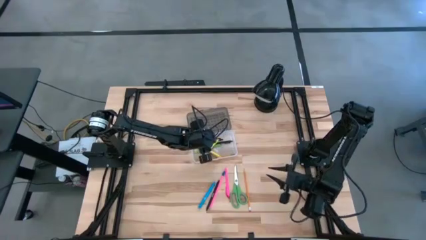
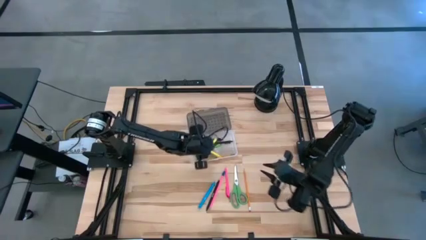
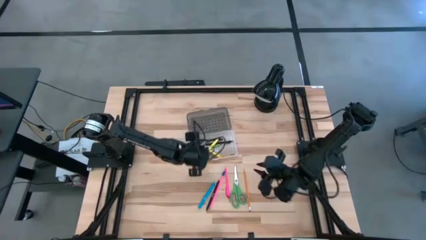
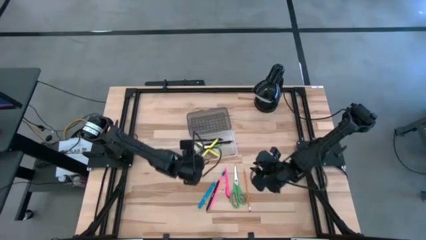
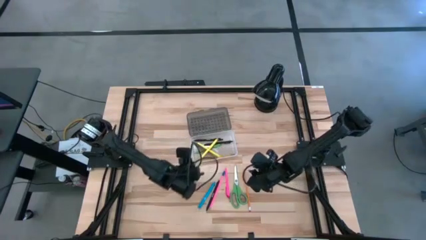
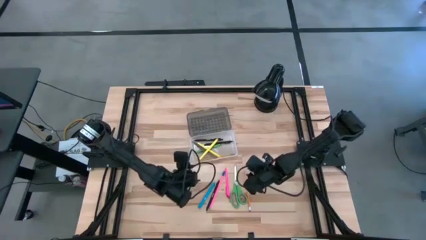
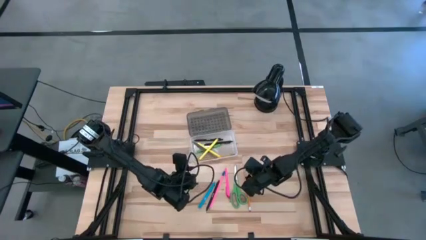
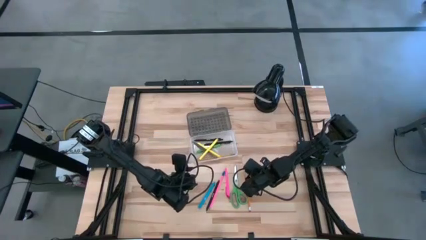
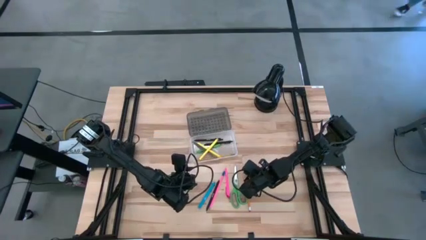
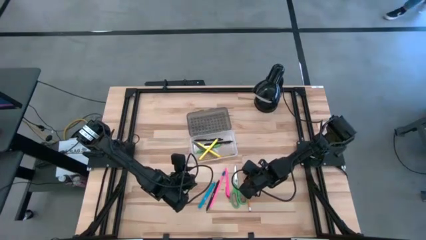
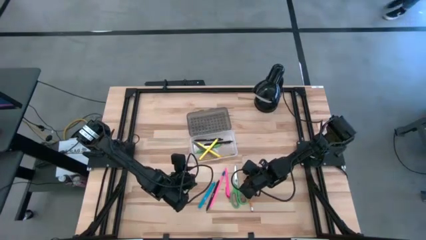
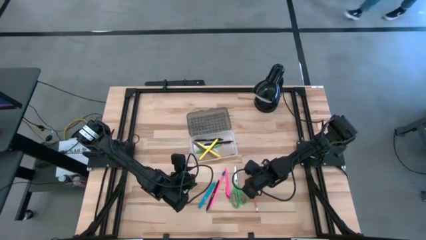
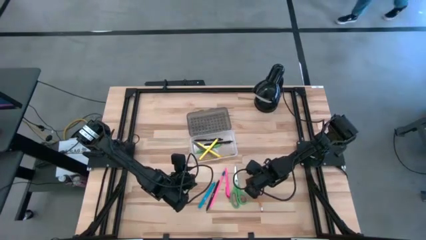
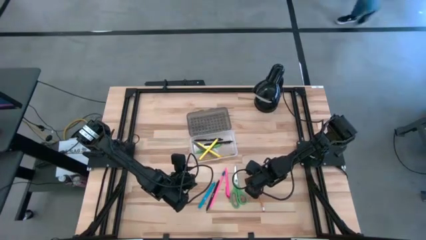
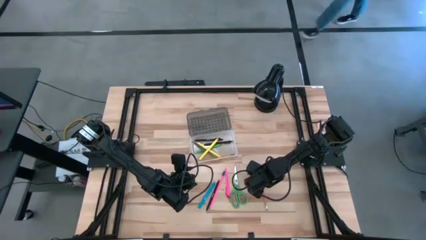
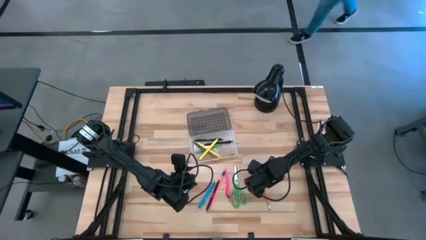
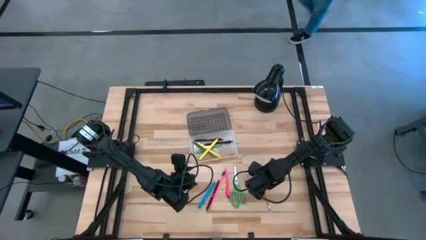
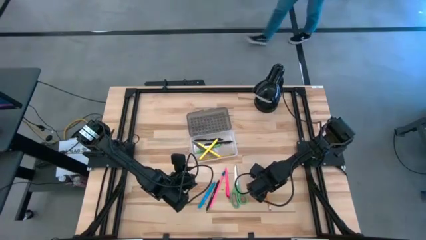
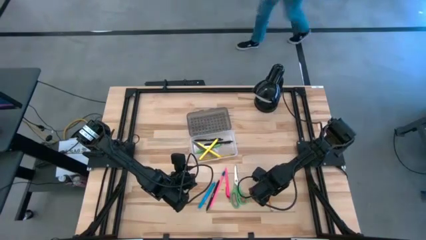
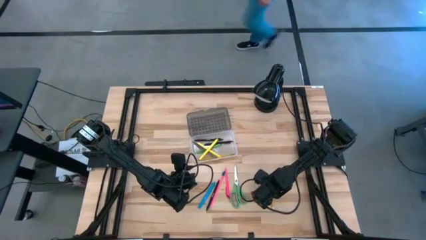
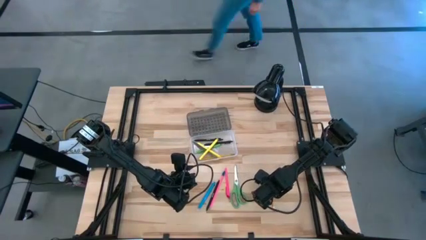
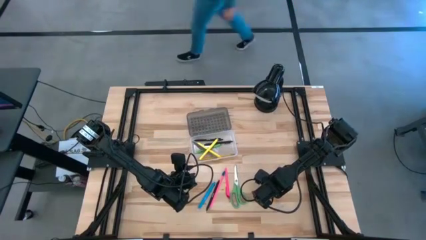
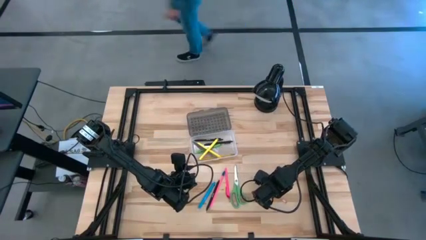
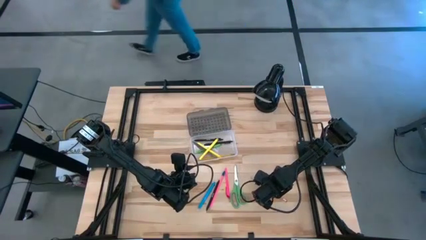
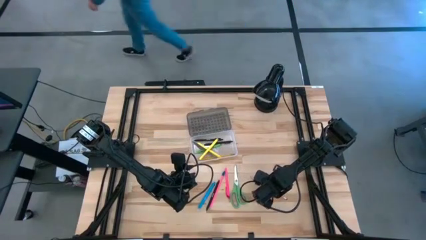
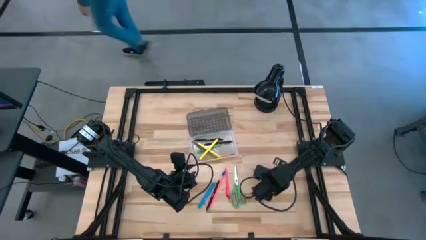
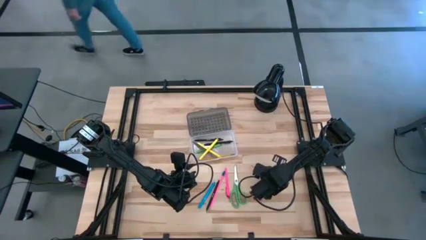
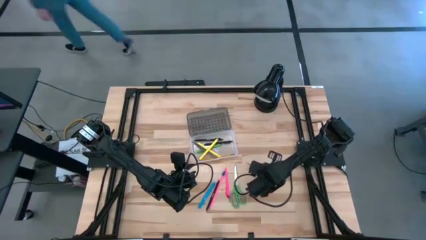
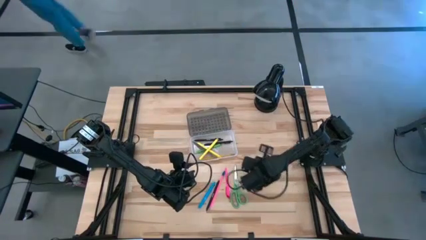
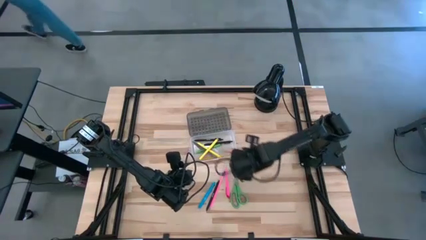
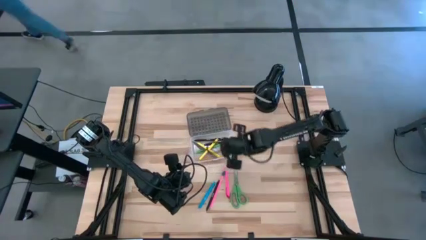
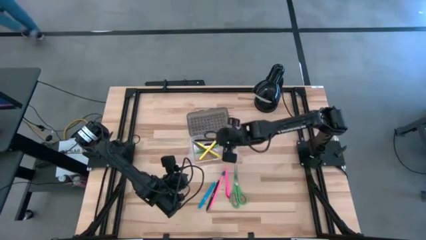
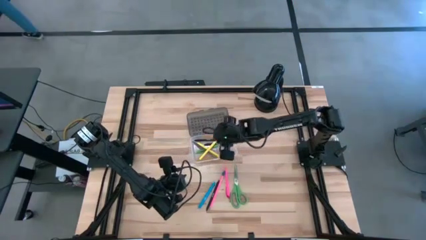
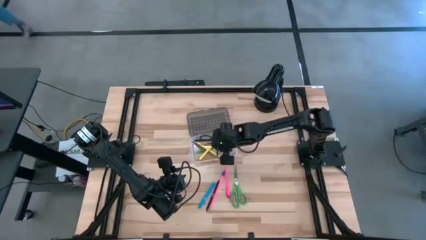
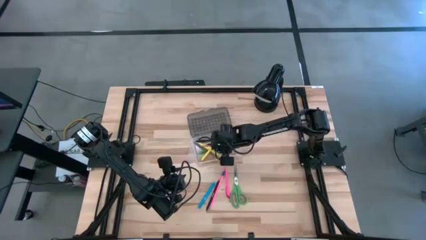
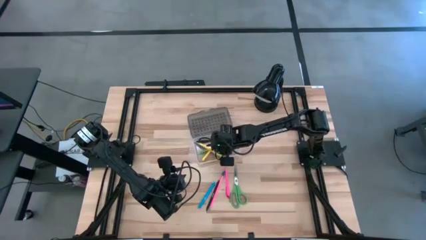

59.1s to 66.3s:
Task: Pick & place school supplies into a supply box
Put the orange pencil into the transparent supply box

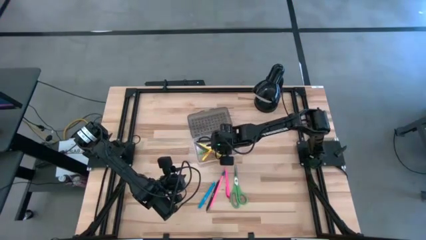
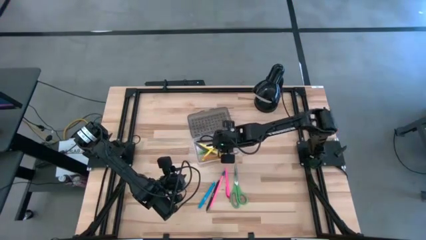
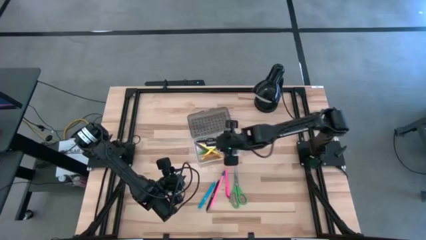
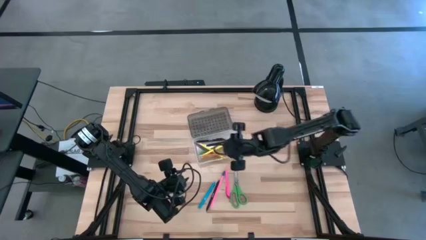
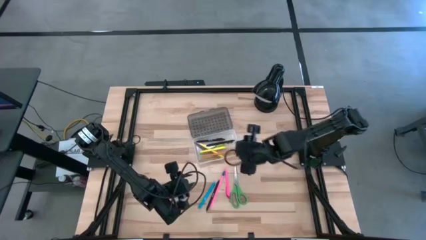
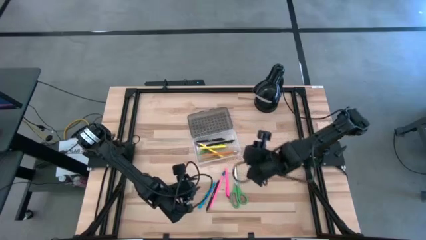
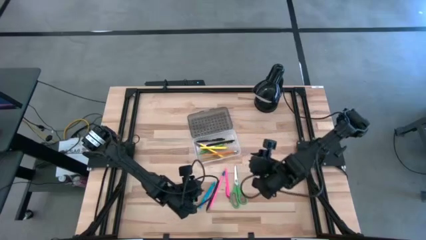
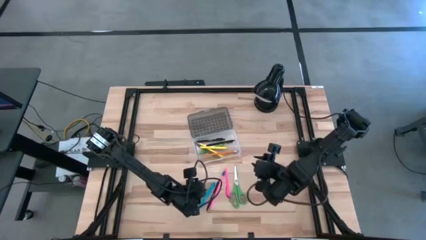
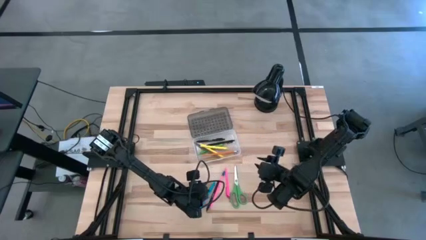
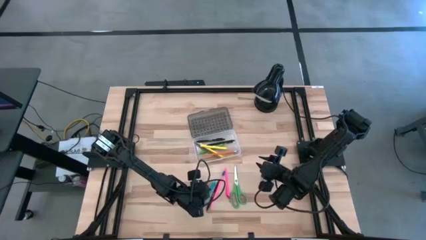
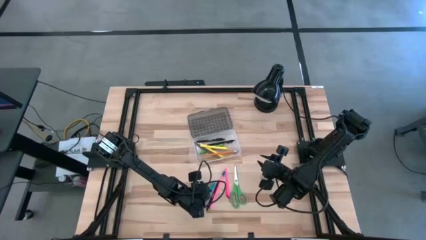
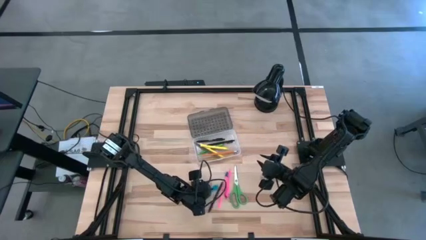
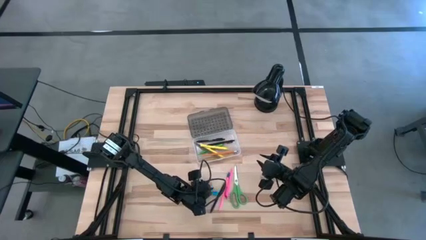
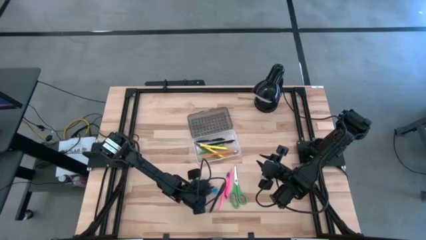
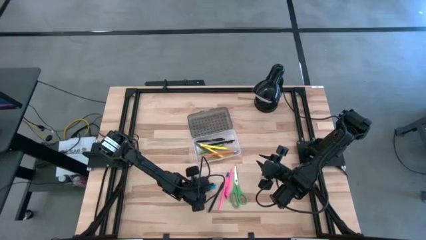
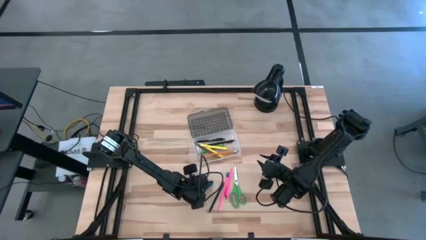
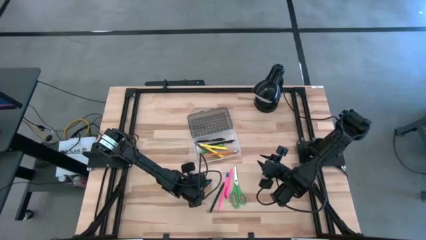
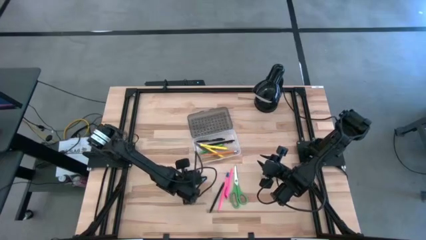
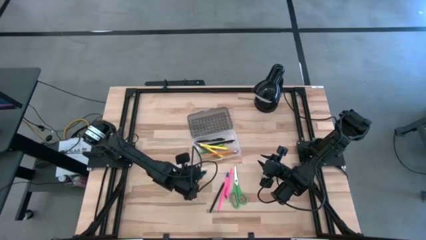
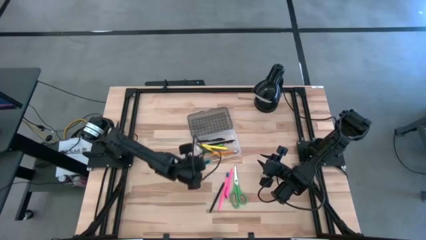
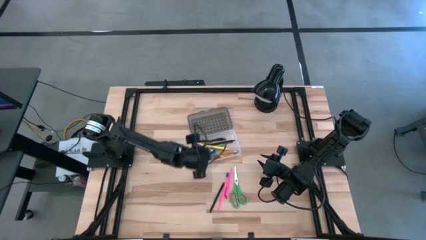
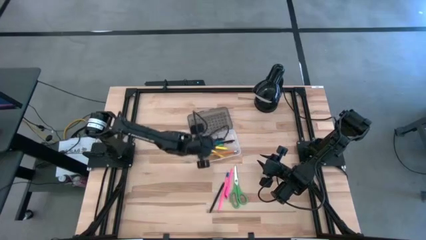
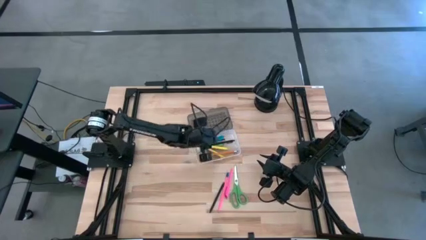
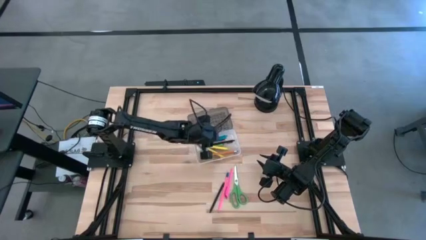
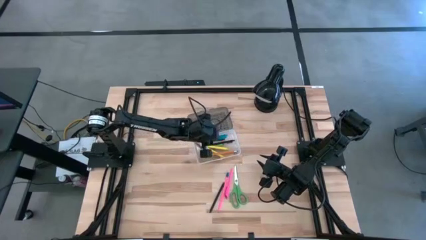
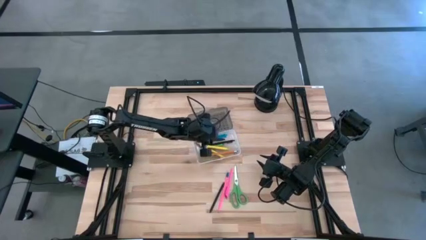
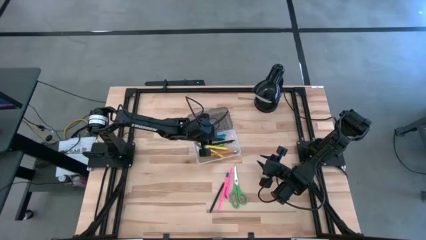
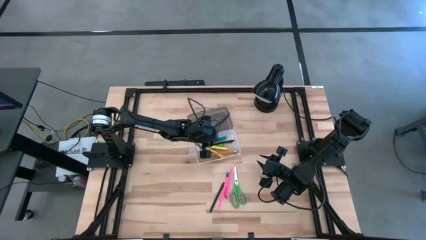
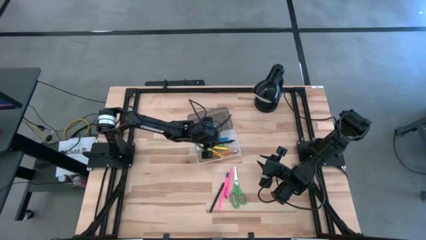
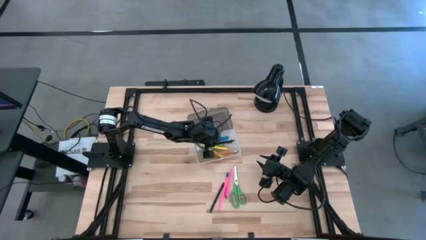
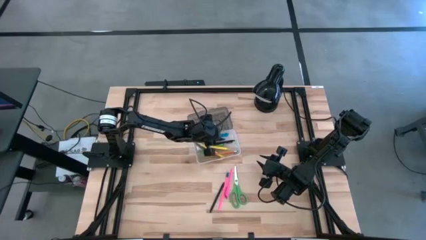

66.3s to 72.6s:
Put the blue pen into the transparent supply box

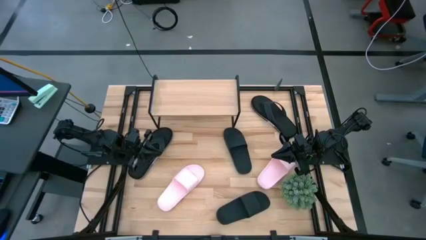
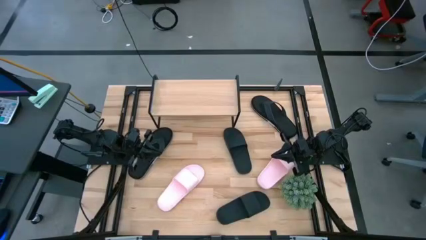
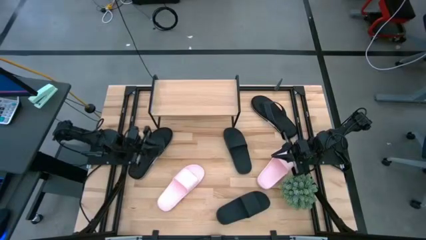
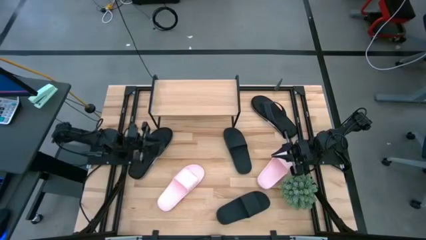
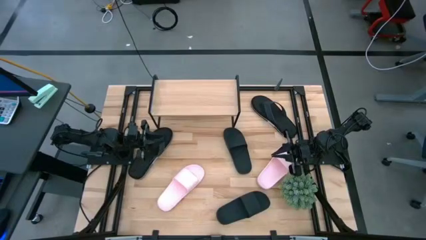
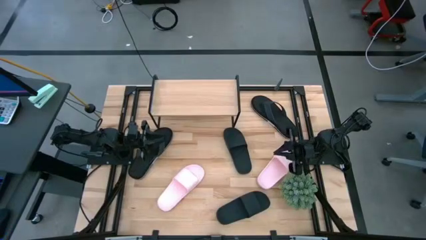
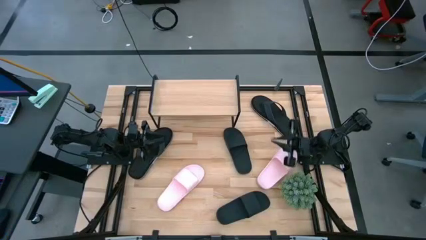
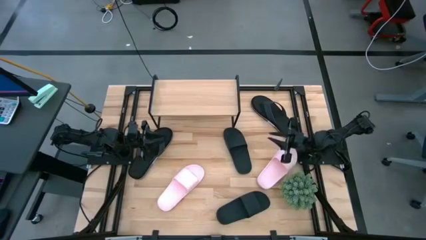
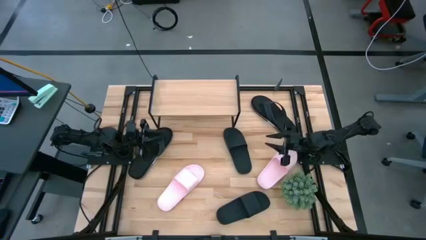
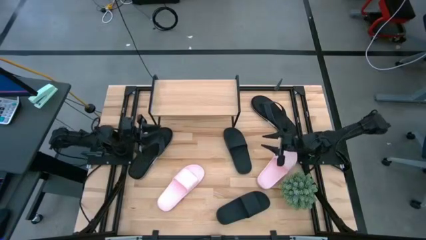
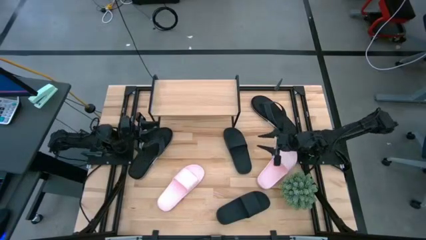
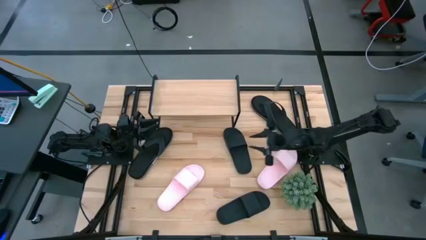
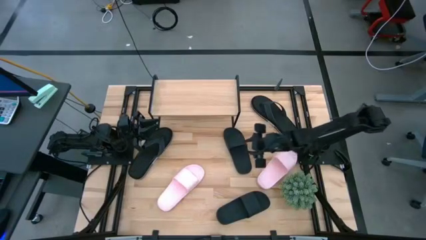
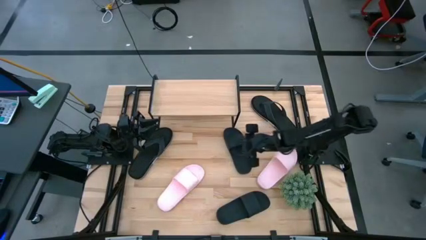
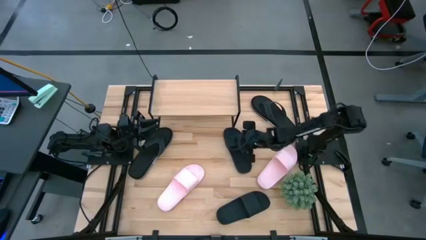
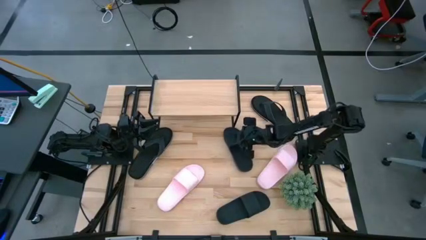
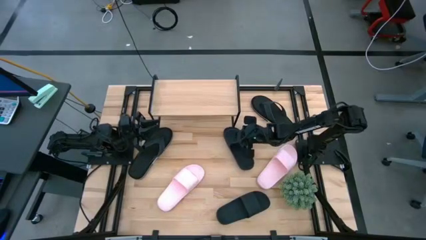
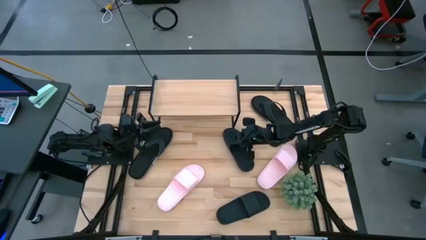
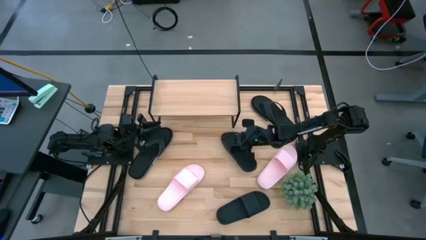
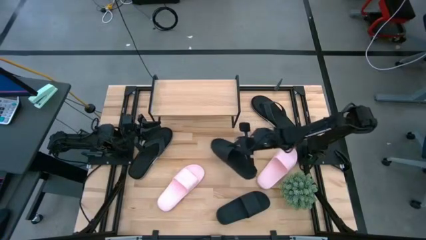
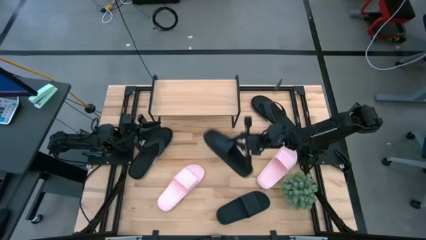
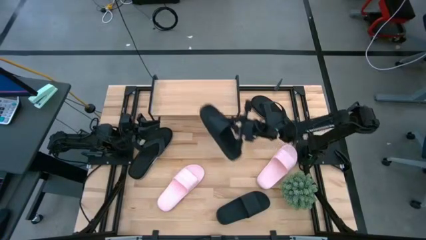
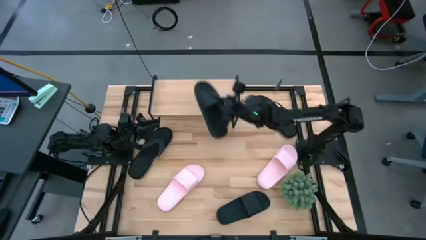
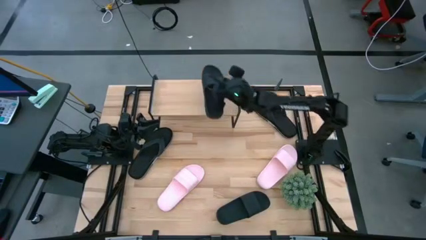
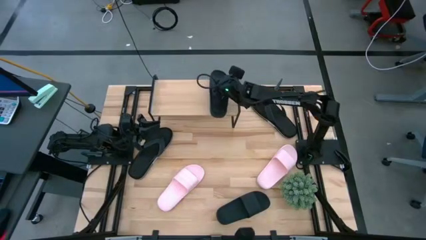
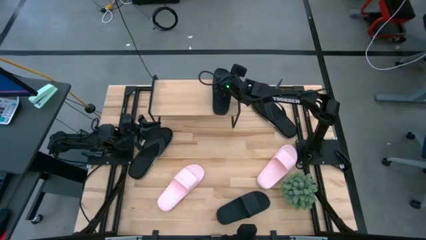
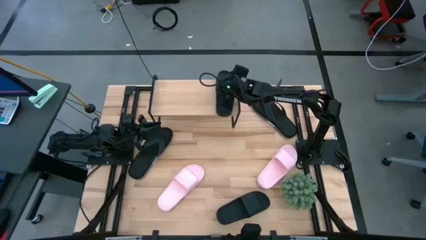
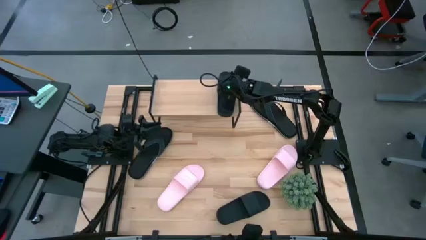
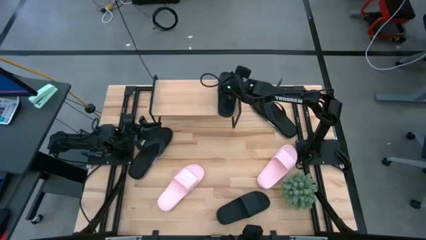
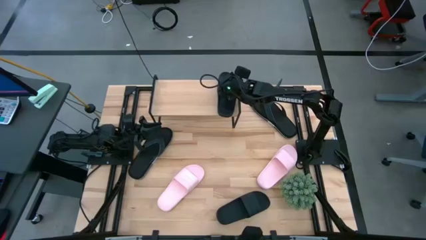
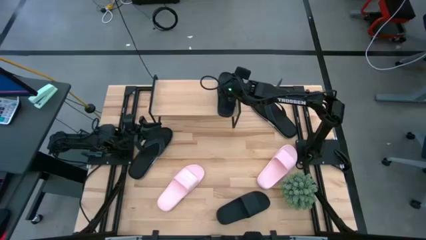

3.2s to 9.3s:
Task: Pick and place slides into the shelf
Put the top black slide on the shelf
